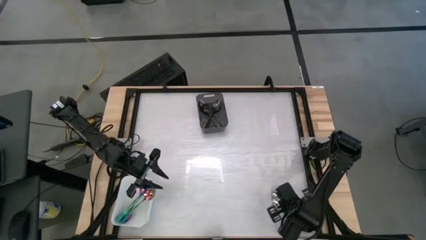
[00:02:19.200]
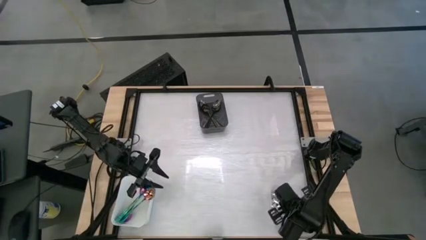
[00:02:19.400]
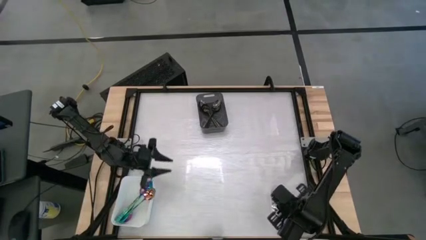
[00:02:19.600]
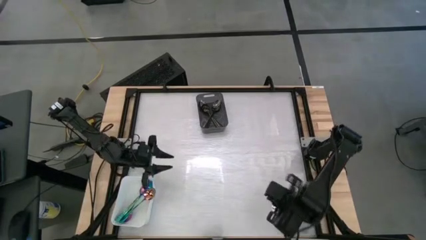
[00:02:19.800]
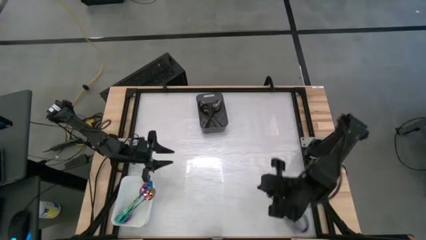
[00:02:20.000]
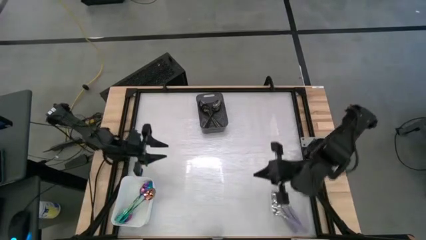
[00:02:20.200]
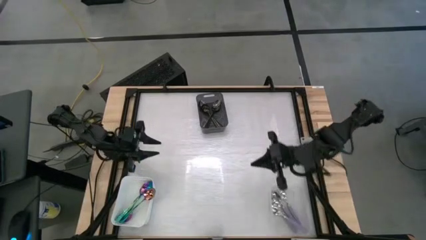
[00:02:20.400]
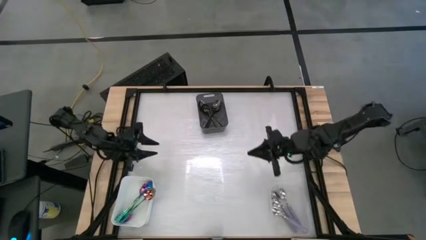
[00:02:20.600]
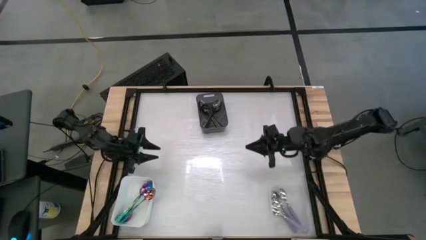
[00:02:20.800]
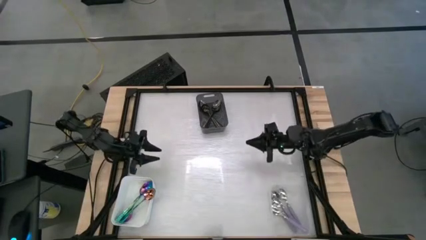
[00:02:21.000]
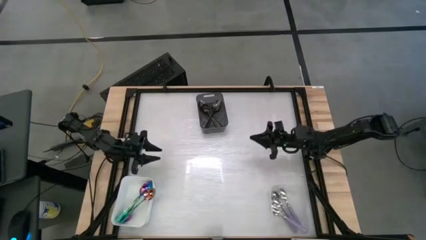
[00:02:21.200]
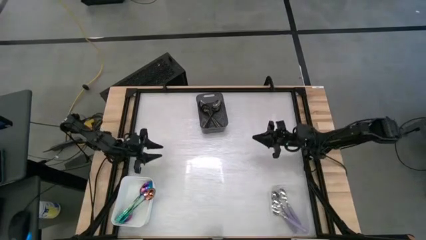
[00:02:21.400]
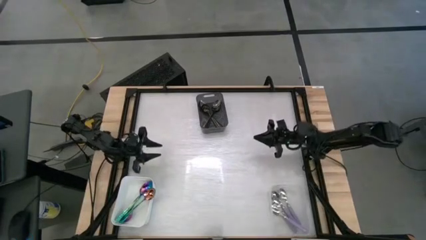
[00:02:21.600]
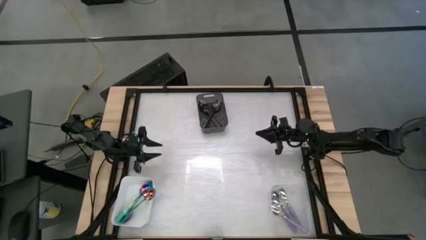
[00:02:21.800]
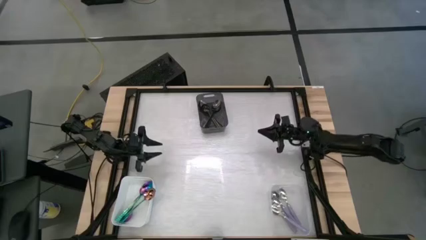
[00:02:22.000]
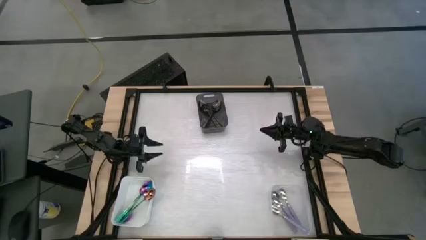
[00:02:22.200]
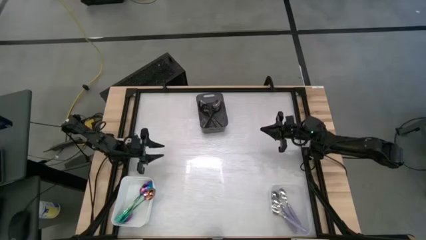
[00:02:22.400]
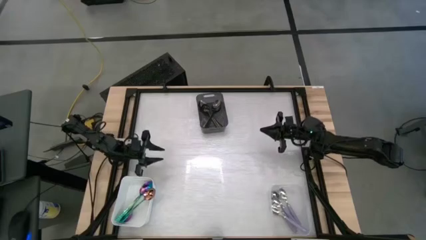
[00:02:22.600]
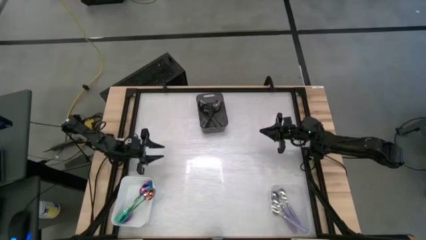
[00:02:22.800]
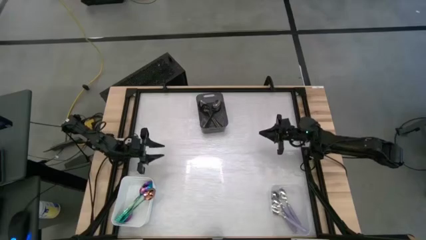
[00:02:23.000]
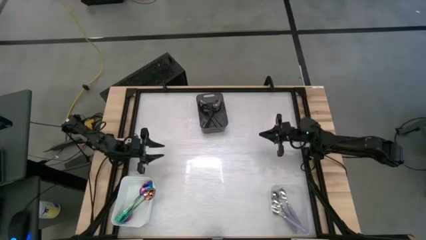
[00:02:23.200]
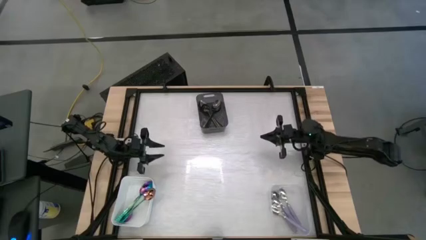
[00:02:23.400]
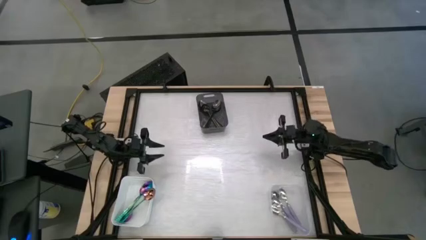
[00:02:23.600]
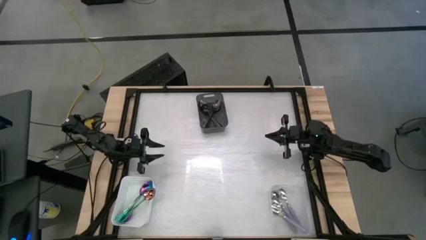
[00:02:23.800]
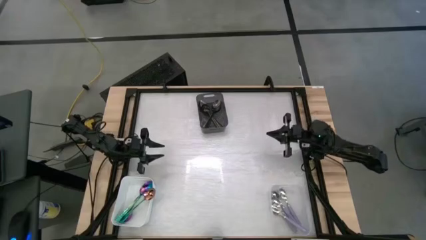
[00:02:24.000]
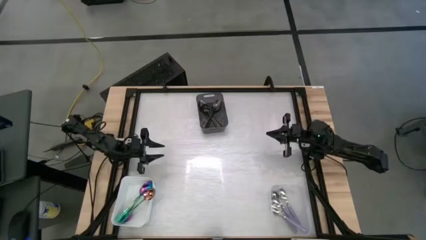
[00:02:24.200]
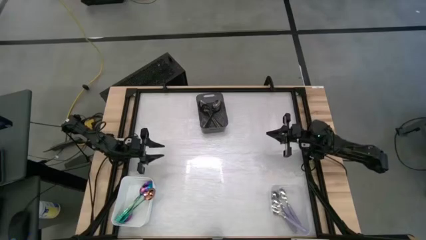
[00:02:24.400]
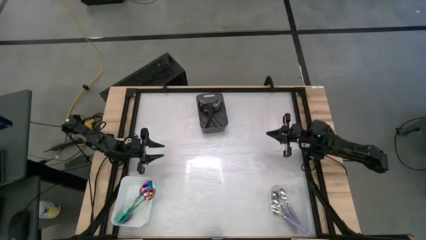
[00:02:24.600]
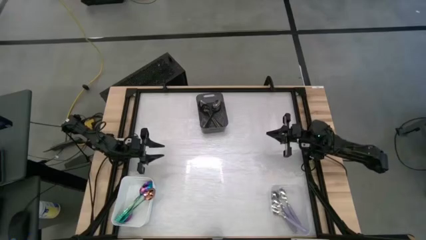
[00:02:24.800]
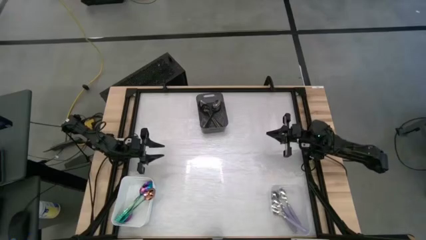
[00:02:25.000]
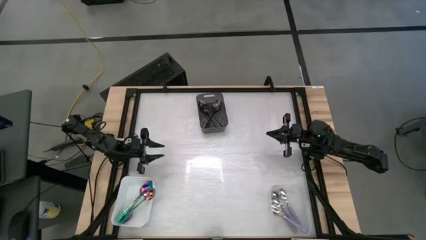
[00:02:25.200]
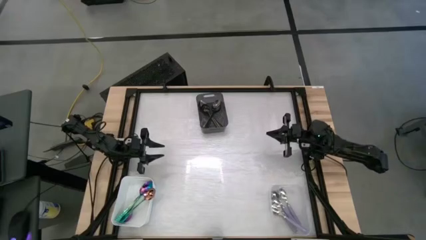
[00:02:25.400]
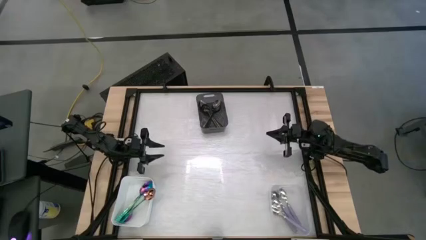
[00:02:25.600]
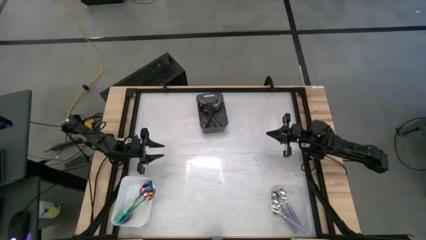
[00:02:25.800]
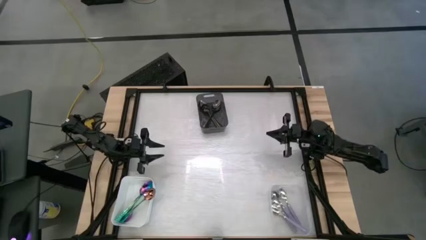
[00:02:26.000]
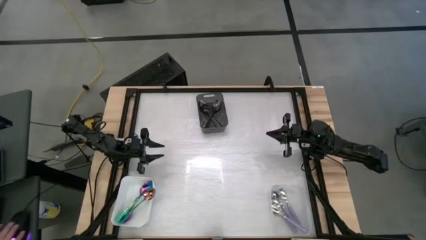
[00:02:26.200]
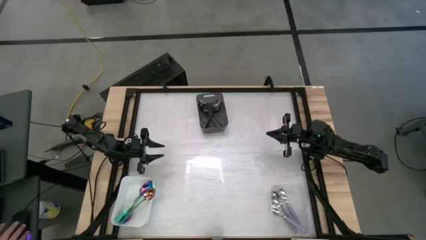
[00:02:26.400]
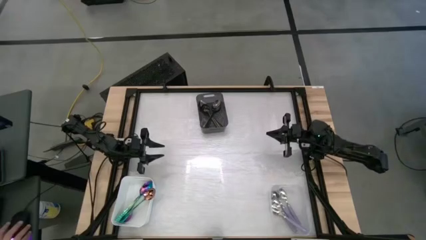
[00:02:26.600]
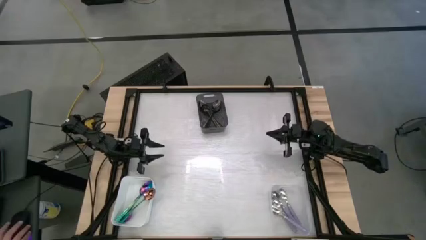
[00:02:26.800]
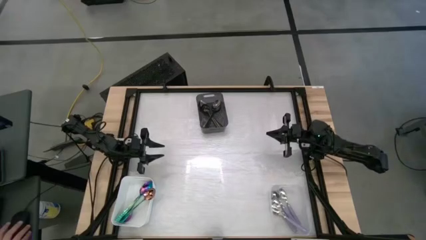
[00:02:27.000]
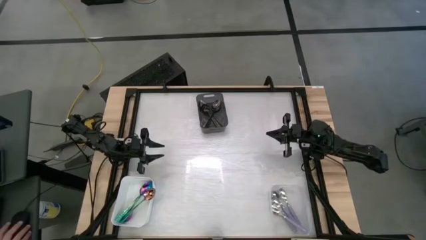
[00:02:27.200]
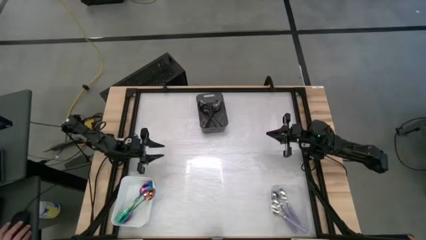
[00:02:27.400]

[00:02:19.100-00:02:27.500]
Task: Sort silverware by color (type)
Return to Home Position
